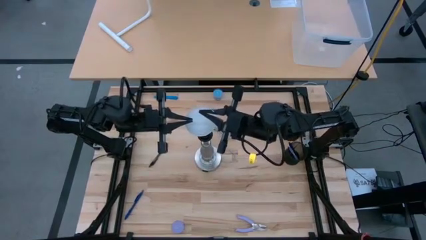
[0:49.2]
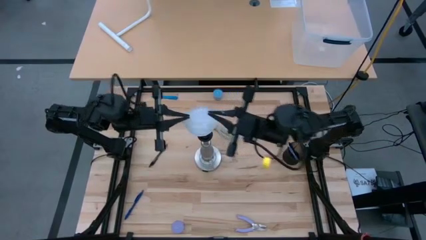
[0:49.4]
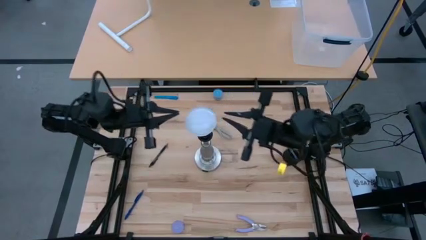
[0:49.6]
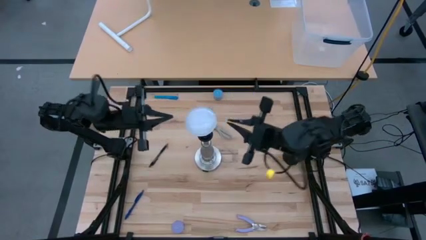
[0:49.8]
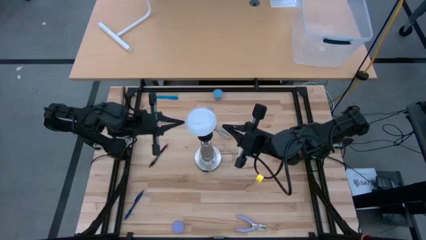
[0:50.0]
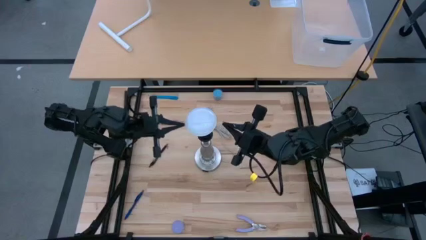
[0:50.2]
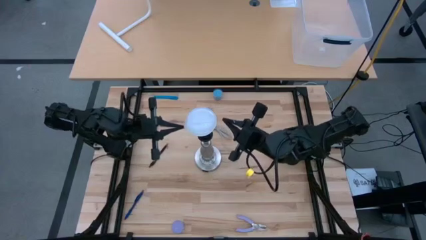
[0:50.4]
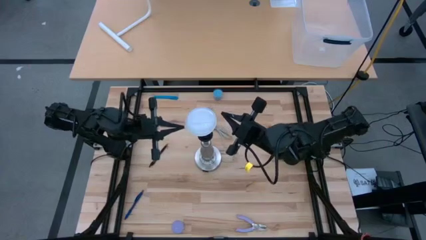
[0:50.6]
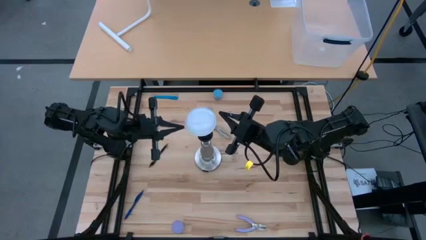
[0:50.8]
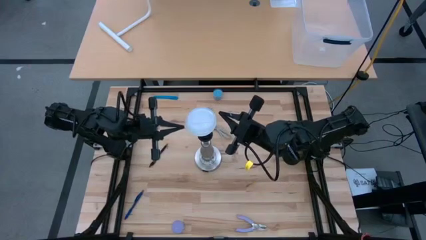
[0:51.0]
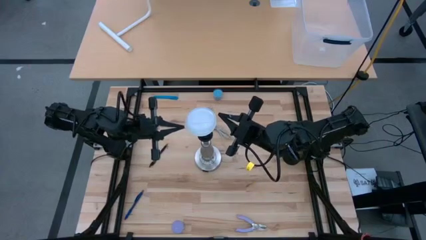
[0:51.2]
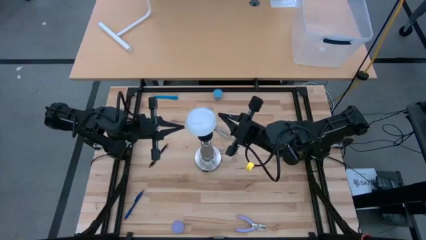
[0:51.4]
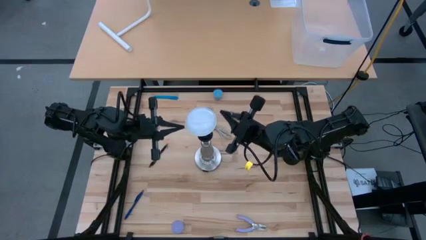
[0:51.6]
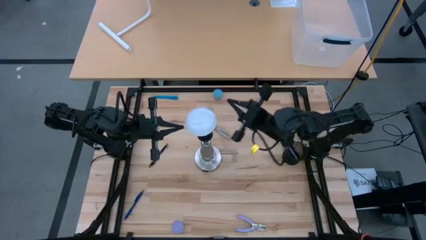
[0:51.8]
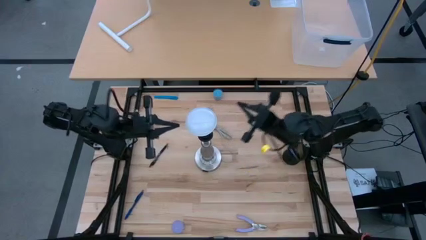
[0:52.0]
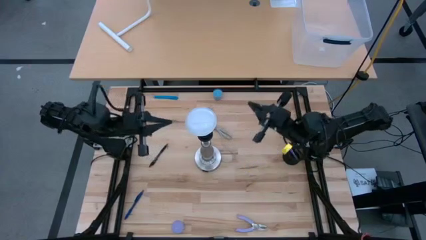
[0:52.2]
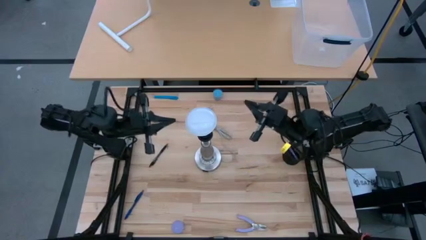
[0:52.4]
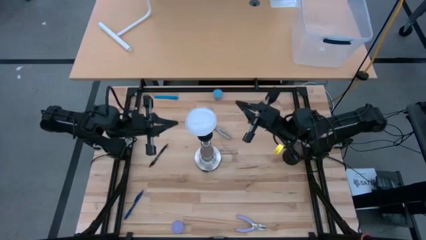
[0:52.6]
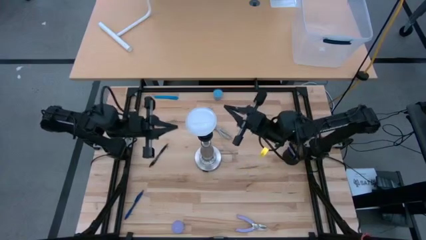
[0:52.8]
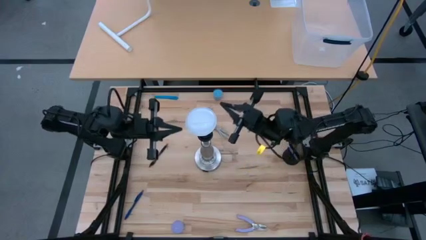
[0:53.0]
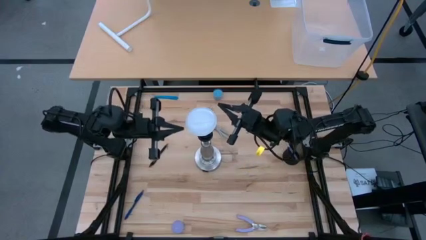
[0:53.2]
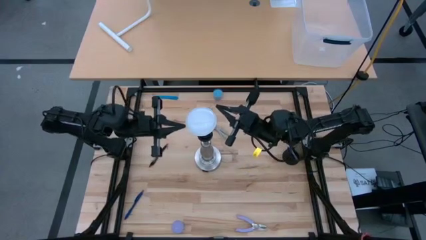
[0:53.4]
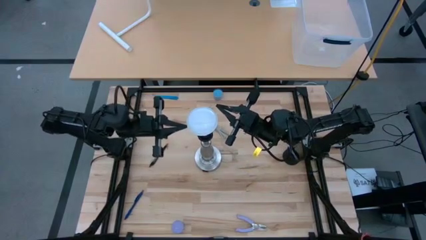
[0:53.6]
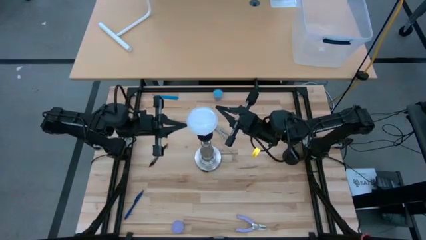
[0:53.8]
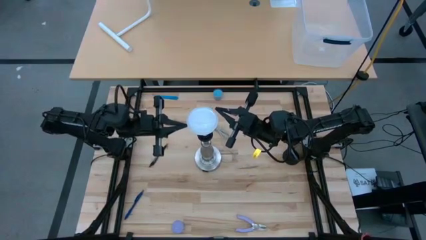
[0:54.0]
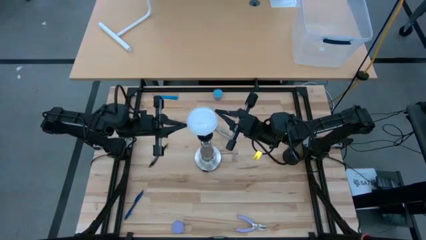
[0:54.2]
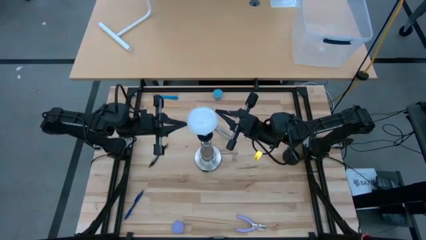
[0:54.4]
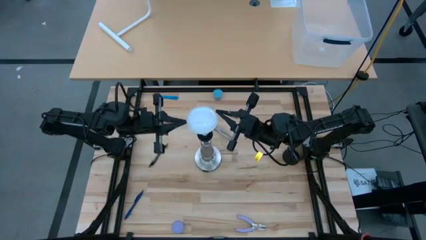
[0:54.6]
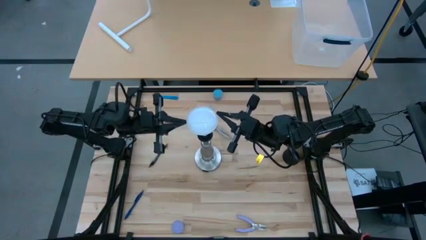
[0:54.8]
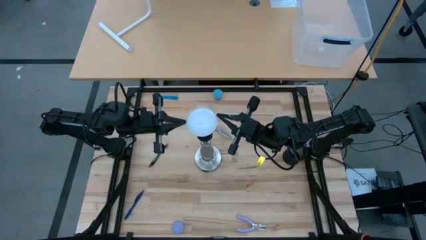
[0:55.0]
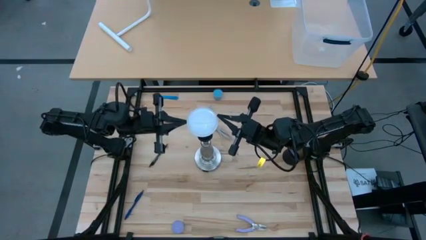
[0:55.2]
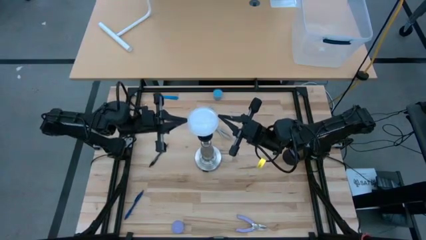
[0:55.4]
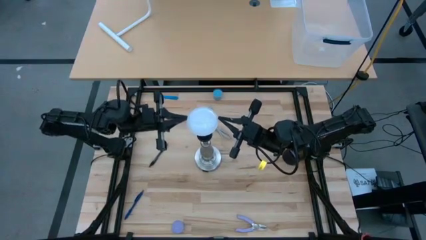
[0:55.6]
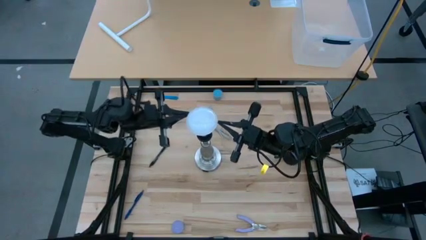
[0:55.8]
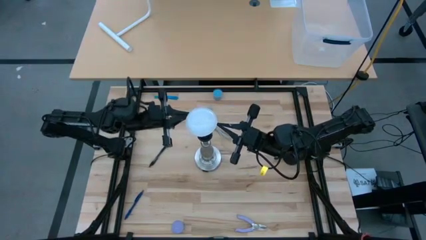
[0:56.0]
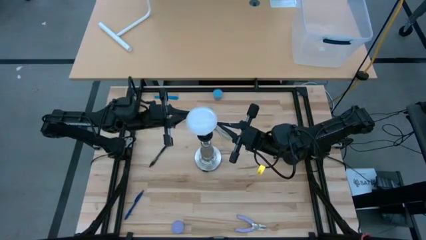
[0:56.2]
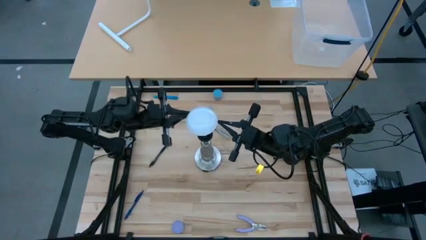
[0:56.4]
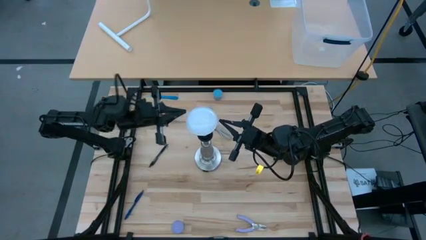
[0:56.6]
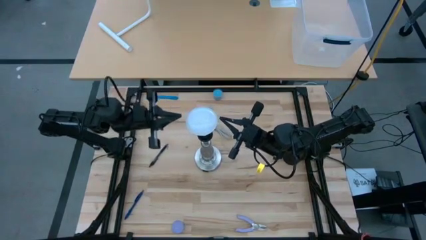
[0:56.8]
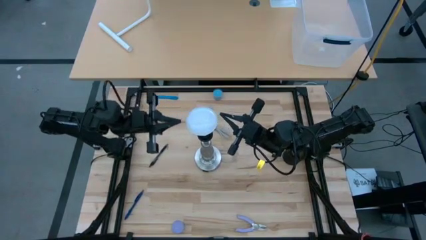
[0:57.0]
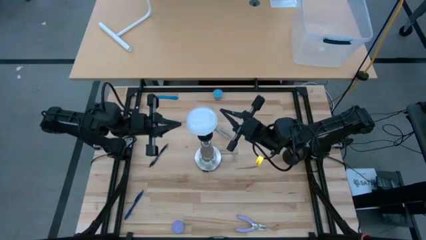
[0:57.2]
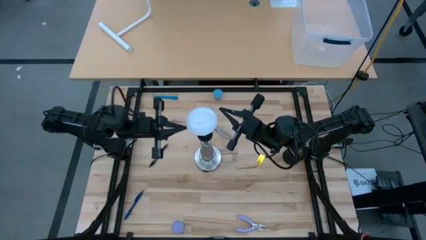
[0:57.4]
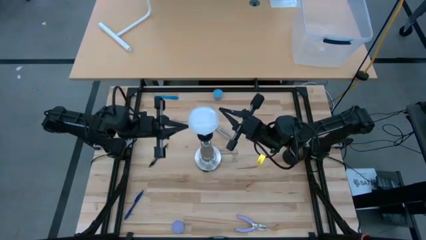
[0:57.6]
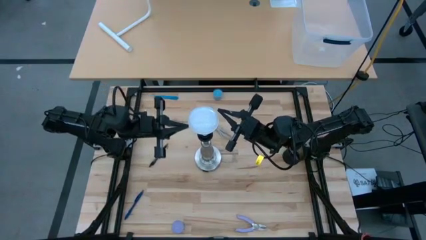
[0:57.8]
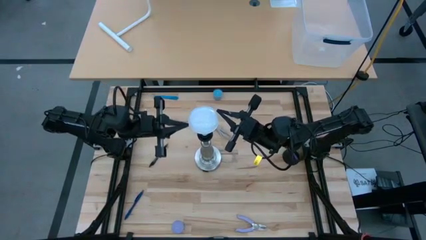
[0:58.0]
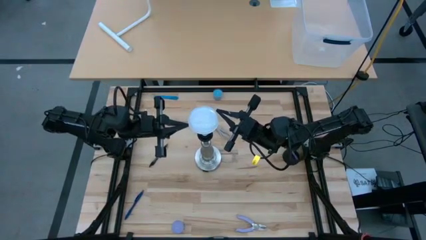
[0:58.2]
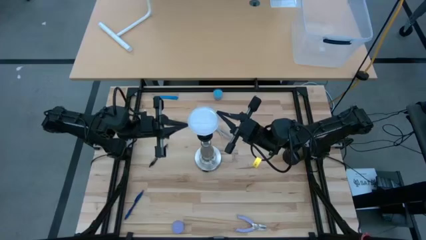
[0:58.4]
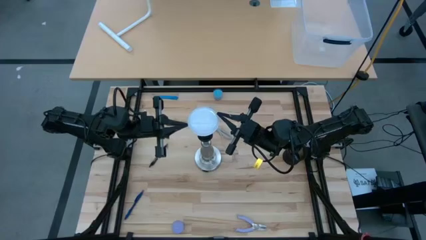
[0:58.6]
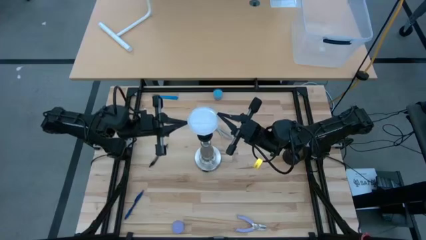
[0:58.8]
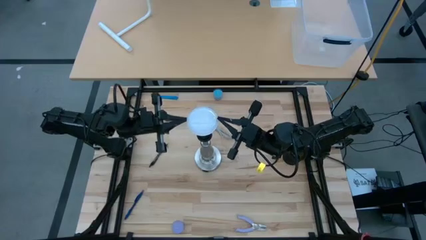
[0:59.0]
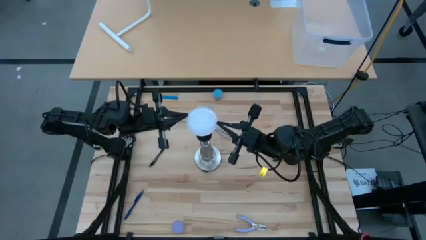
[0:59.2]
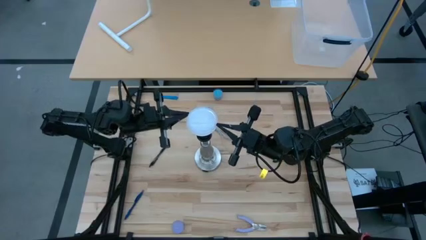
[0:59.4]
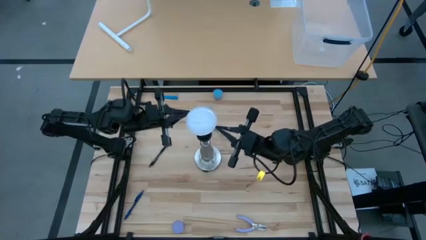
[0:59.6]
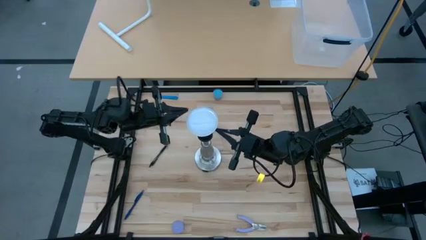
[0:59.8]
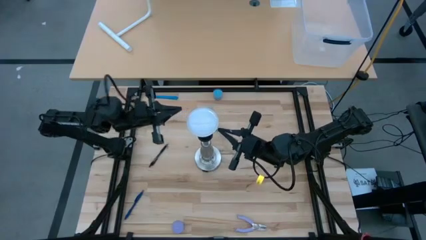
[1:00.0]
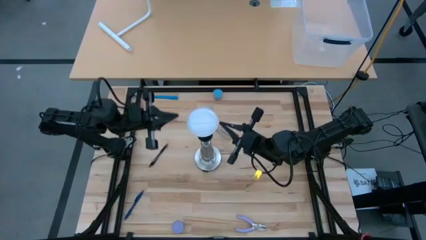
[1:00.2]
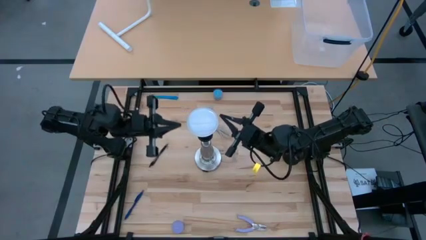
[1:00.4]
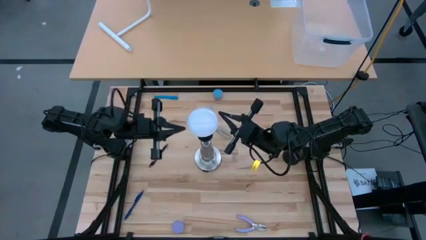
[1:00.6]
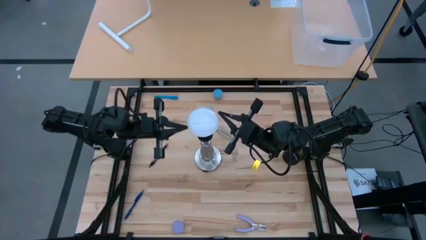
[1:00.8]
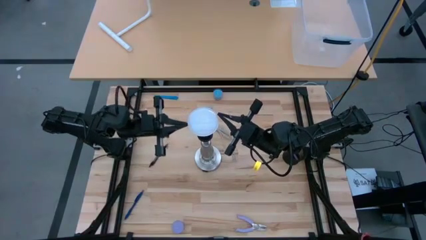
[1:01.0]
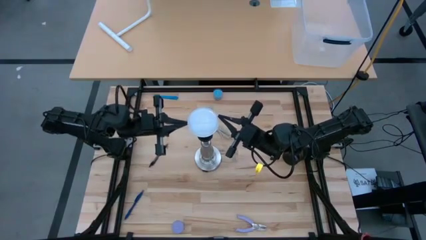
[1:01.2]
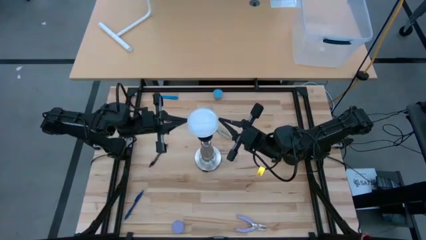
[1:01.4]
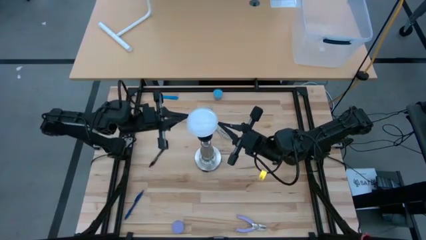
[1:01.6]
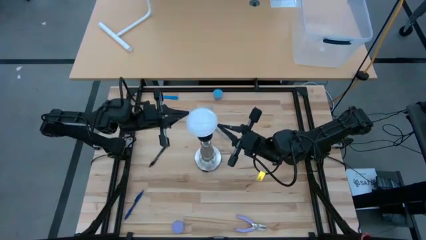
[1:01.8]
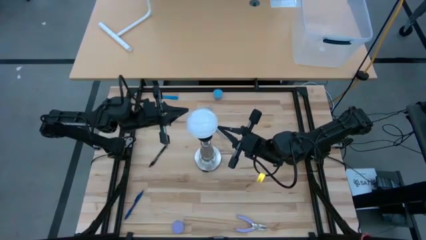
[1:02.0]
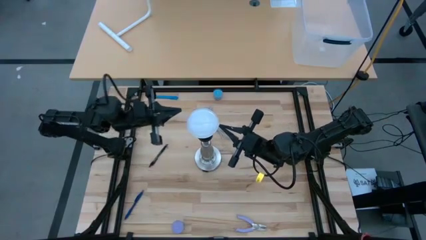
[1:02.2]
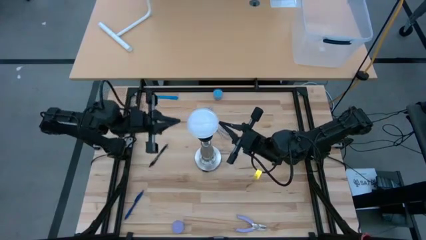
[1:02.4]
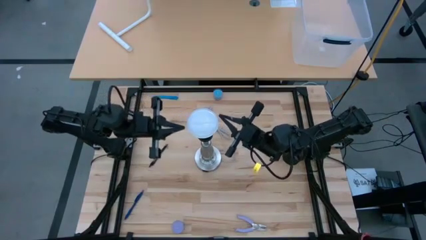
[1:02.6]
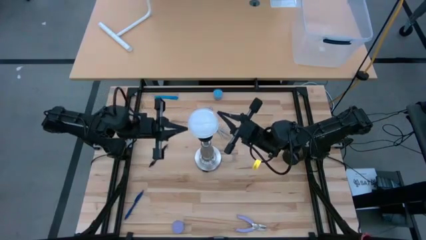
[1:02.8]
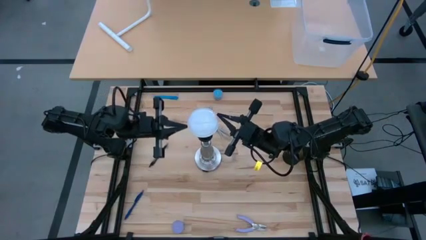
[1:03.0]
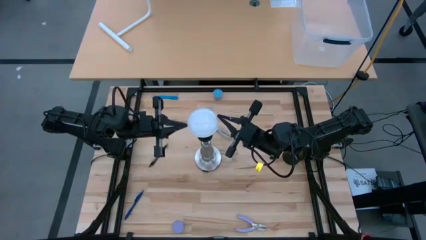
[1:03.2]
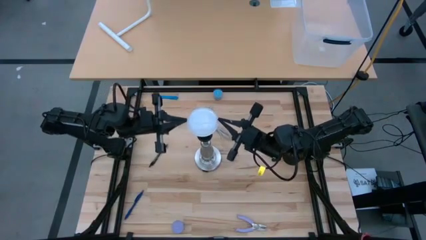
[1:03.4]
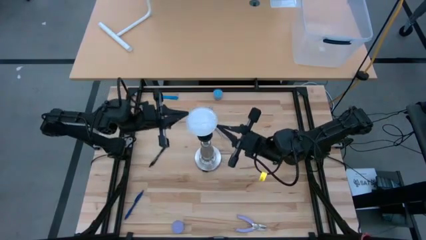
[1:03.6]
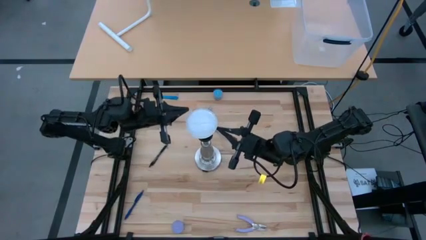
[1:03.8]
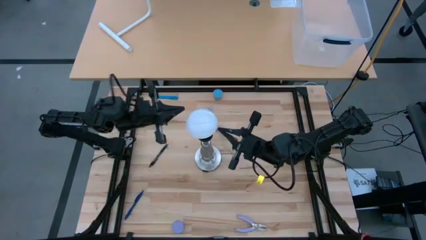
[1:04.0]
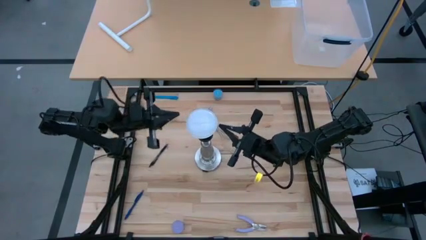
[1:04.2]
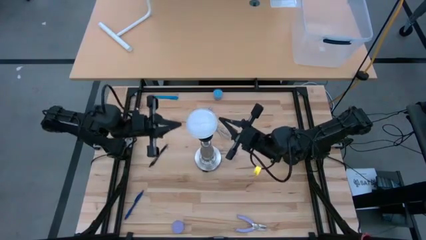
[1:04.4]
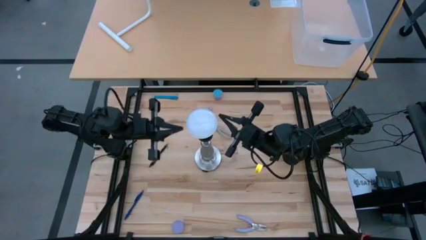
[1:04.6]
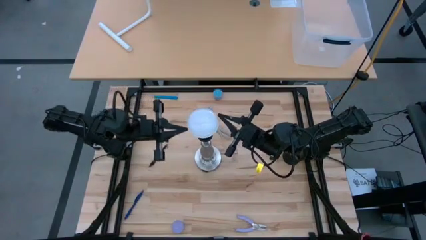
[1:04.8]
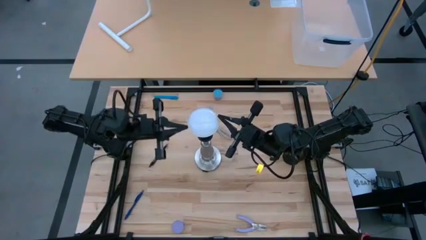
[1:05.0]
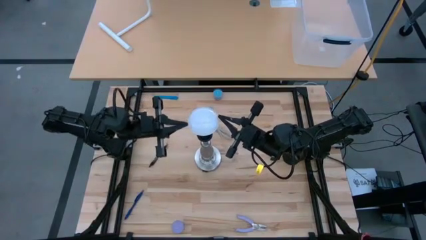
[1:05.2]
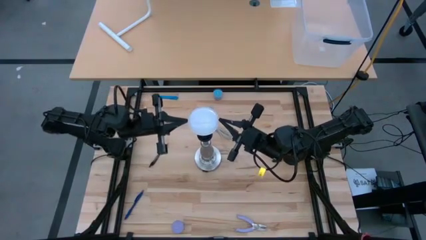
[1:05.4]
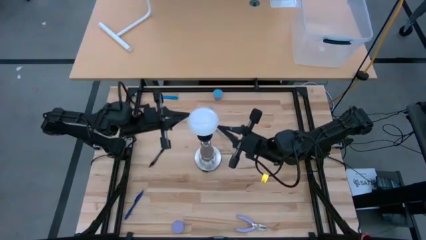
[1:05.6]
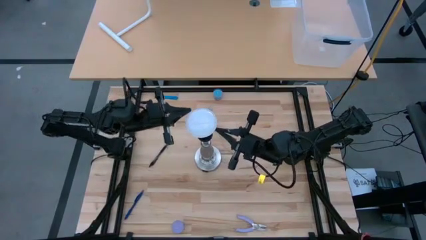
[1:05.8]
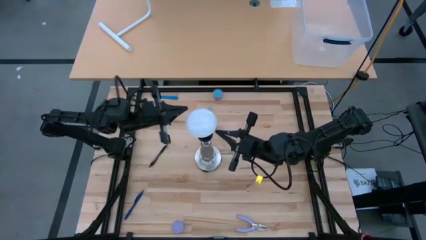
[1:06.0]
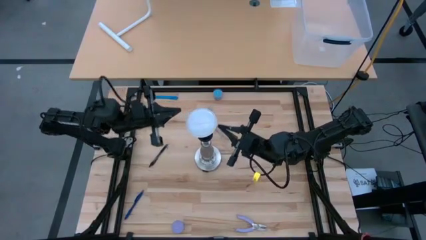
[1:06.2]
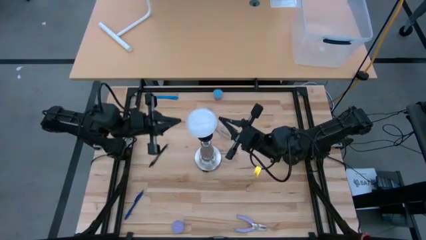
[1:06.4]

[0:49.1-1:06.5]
Task: Screw lightbulb
Insert the lightbulb into the lamp
